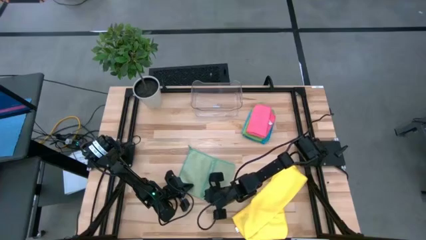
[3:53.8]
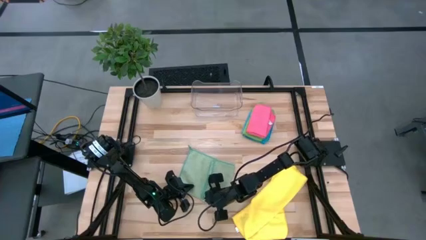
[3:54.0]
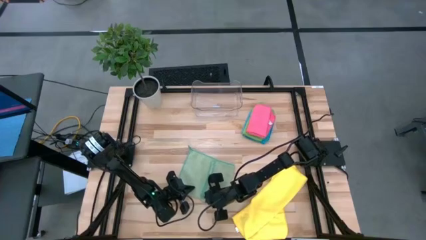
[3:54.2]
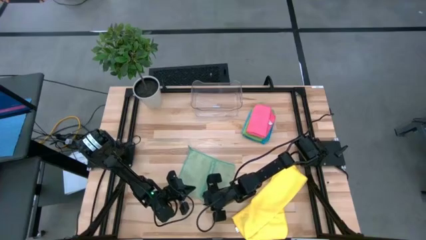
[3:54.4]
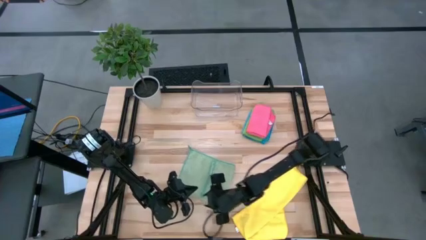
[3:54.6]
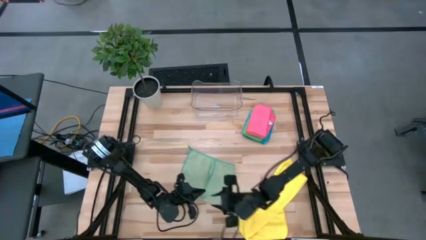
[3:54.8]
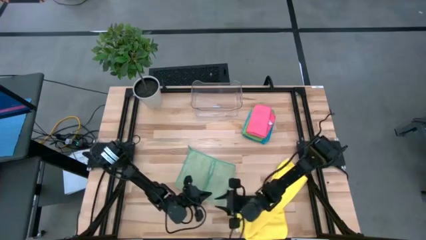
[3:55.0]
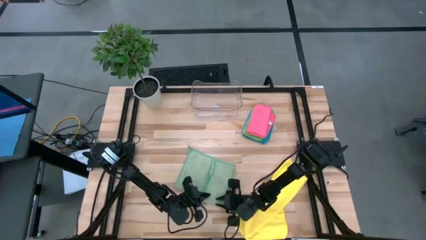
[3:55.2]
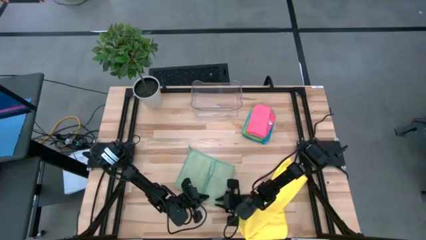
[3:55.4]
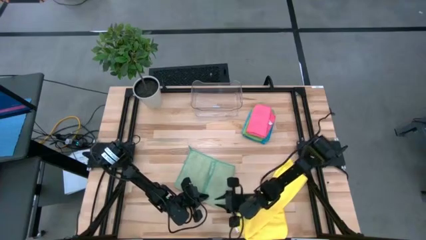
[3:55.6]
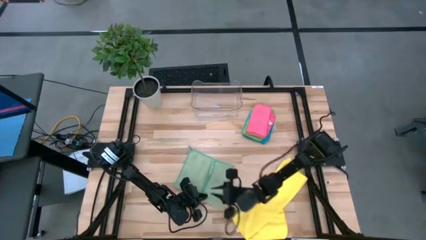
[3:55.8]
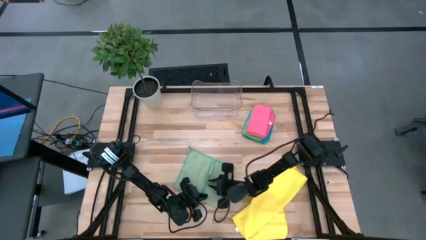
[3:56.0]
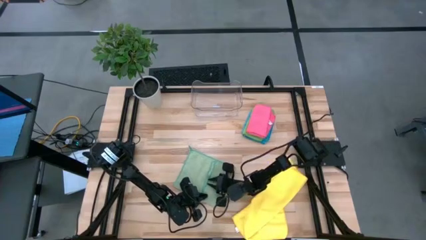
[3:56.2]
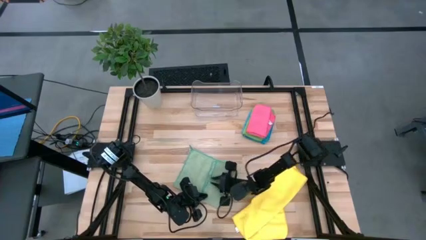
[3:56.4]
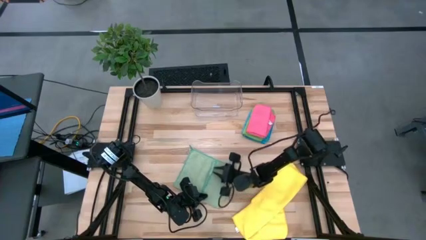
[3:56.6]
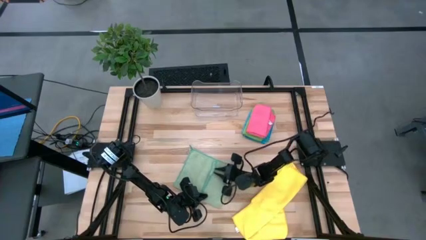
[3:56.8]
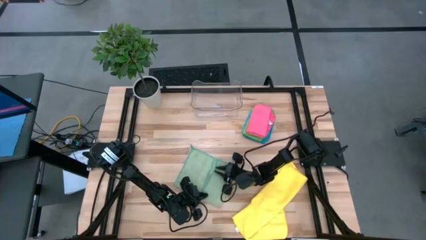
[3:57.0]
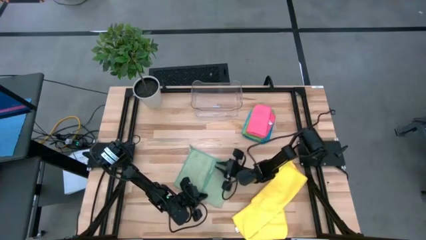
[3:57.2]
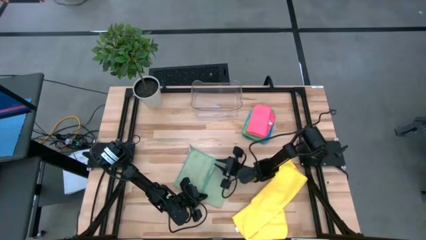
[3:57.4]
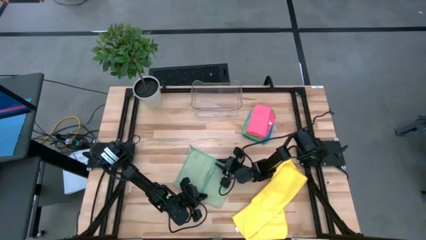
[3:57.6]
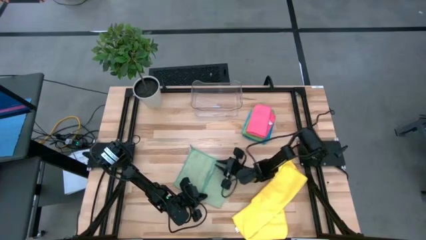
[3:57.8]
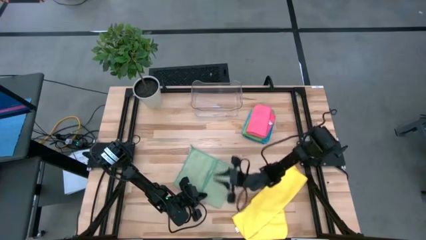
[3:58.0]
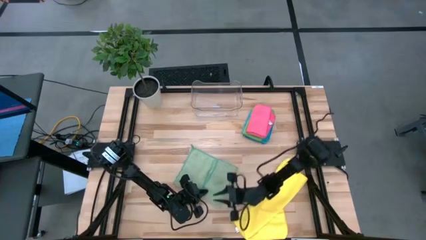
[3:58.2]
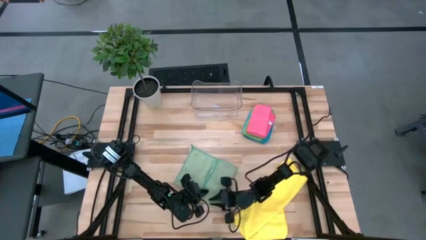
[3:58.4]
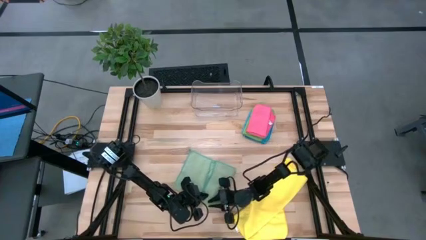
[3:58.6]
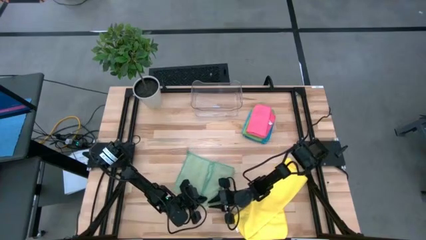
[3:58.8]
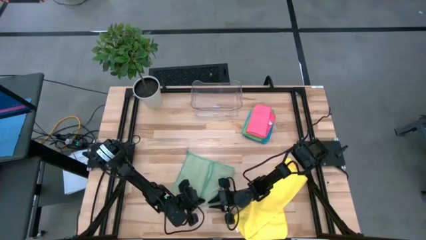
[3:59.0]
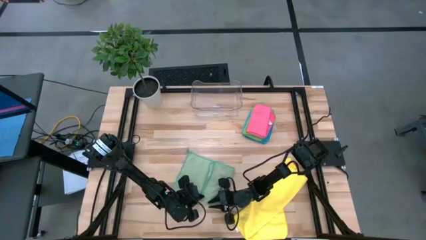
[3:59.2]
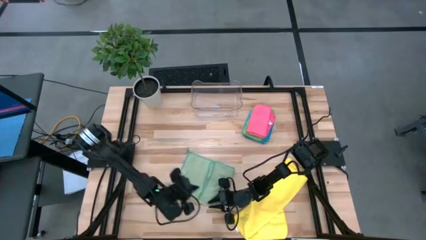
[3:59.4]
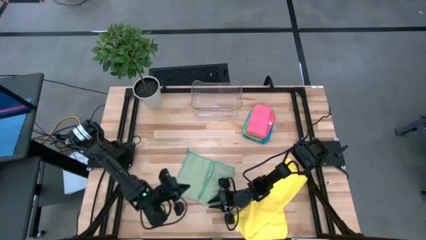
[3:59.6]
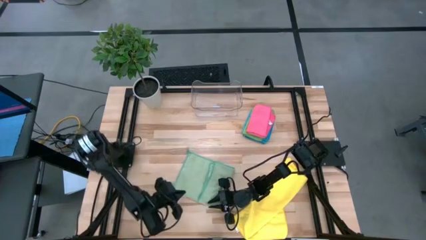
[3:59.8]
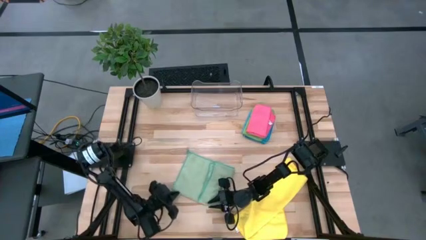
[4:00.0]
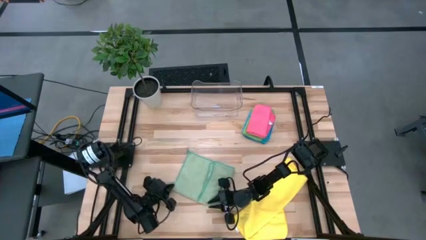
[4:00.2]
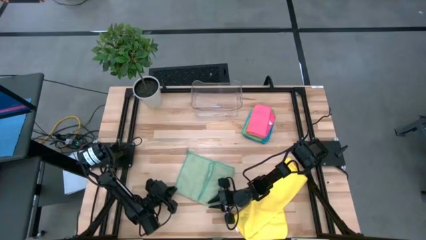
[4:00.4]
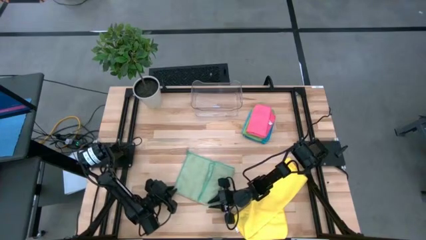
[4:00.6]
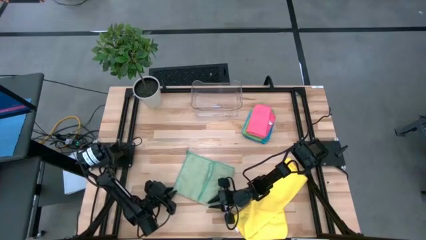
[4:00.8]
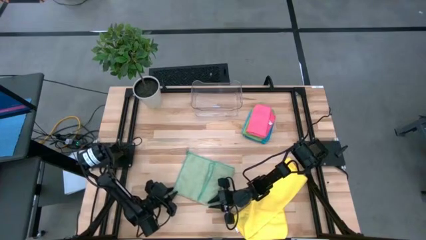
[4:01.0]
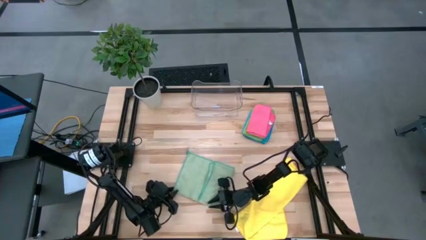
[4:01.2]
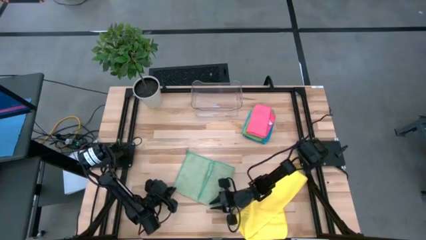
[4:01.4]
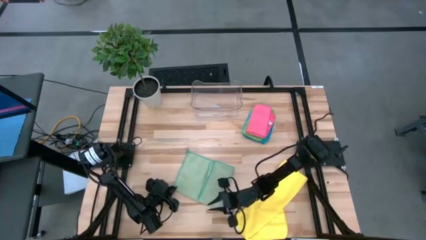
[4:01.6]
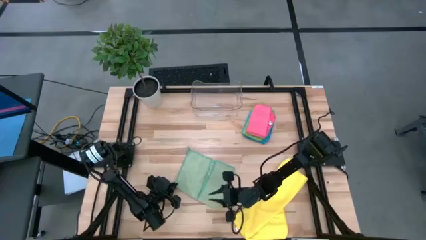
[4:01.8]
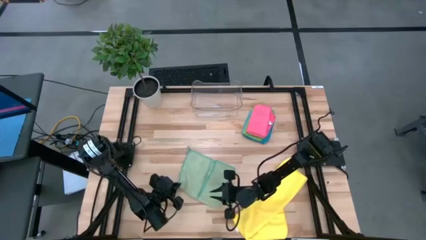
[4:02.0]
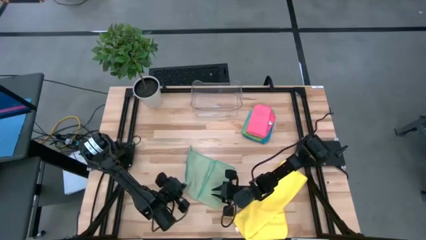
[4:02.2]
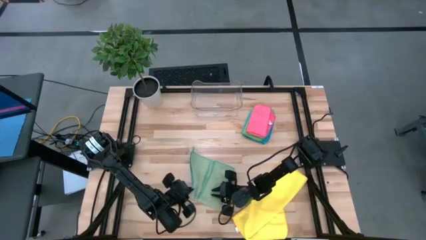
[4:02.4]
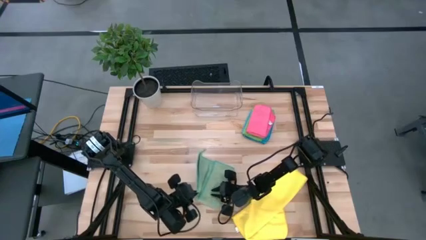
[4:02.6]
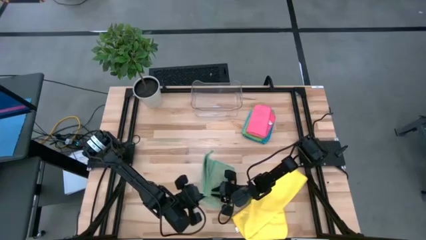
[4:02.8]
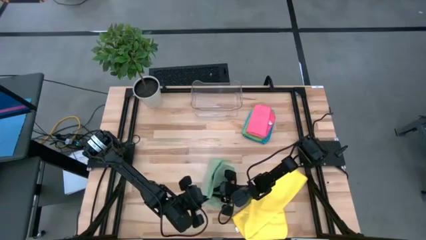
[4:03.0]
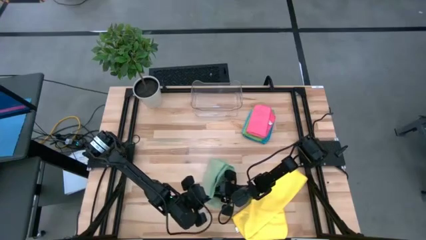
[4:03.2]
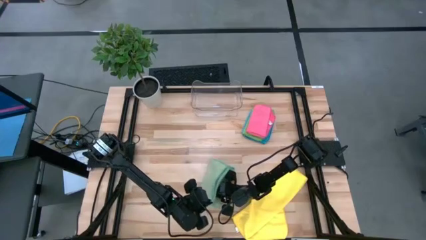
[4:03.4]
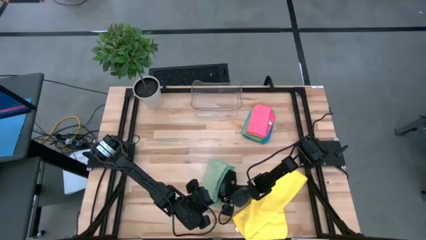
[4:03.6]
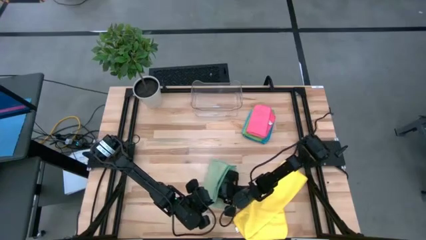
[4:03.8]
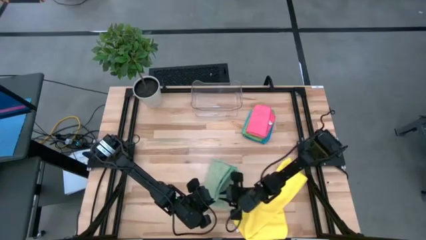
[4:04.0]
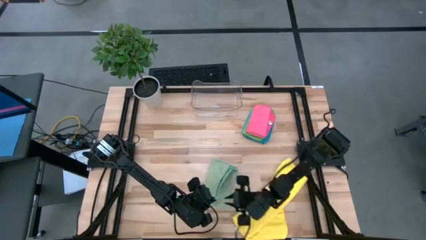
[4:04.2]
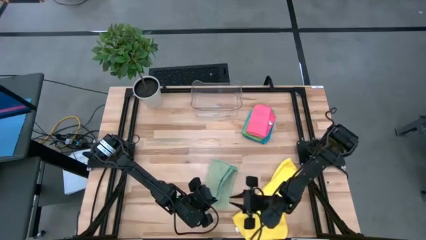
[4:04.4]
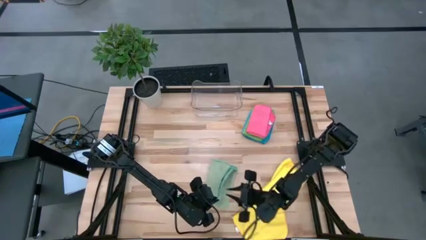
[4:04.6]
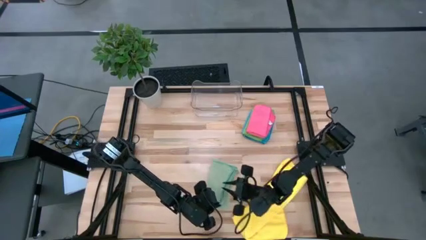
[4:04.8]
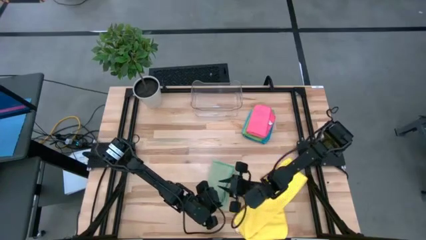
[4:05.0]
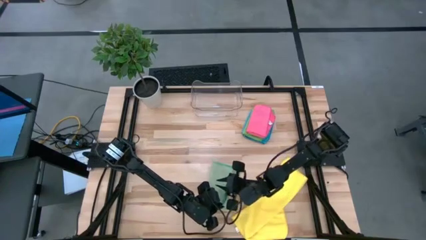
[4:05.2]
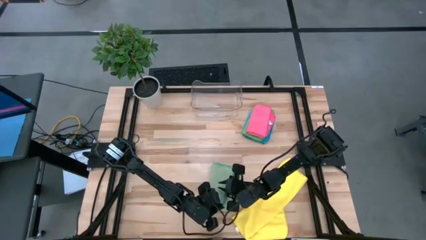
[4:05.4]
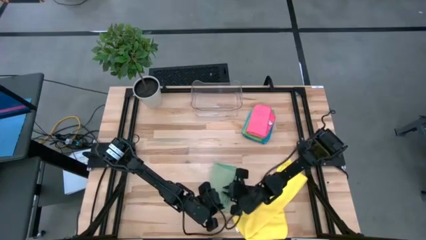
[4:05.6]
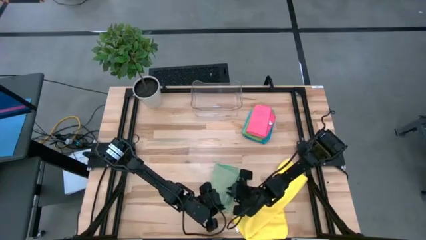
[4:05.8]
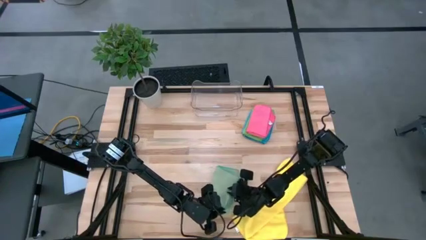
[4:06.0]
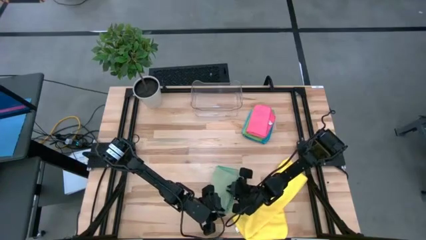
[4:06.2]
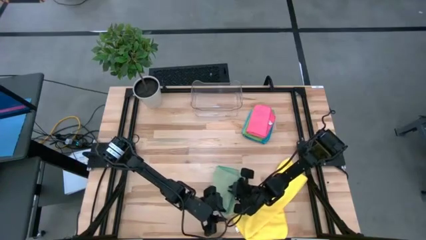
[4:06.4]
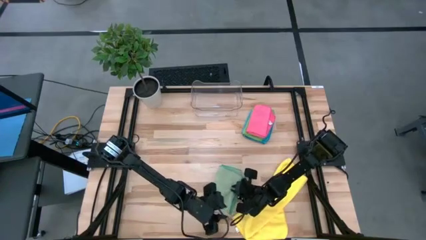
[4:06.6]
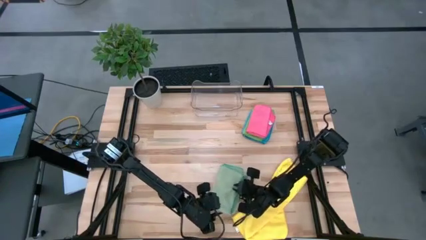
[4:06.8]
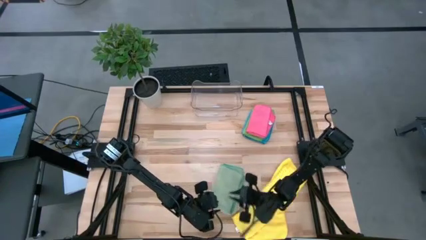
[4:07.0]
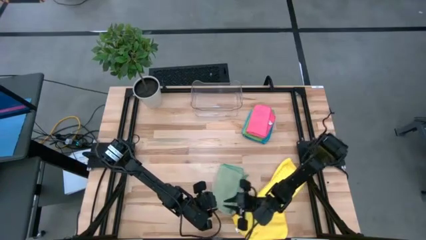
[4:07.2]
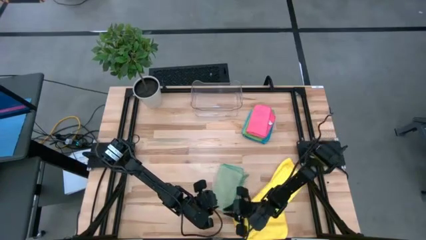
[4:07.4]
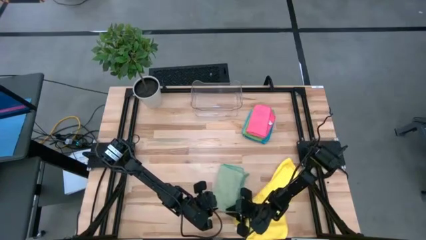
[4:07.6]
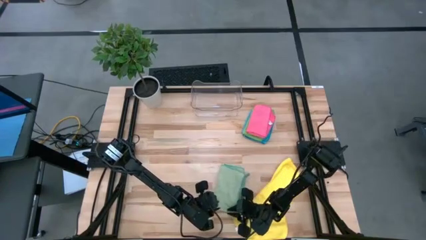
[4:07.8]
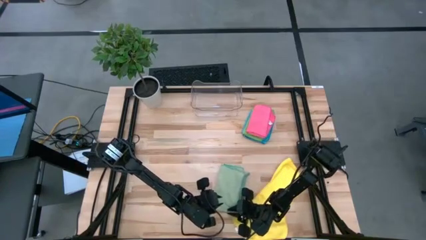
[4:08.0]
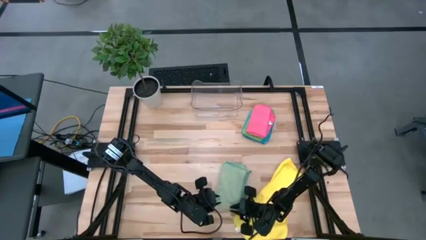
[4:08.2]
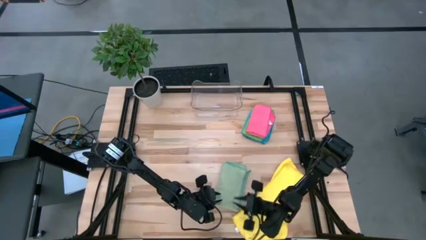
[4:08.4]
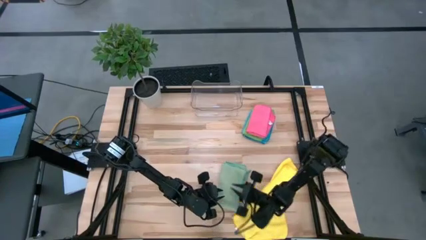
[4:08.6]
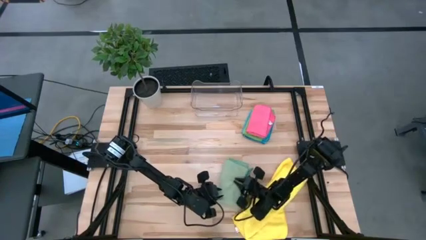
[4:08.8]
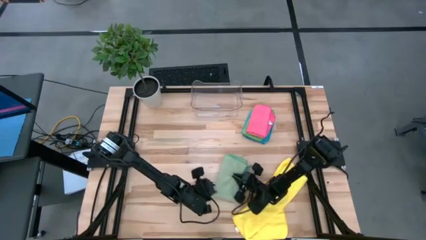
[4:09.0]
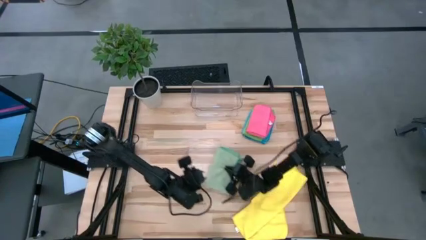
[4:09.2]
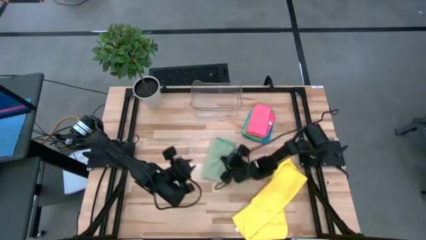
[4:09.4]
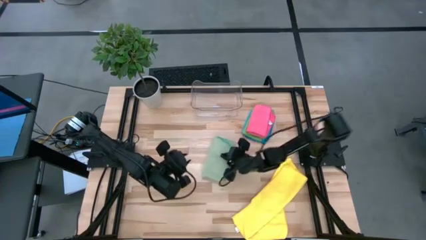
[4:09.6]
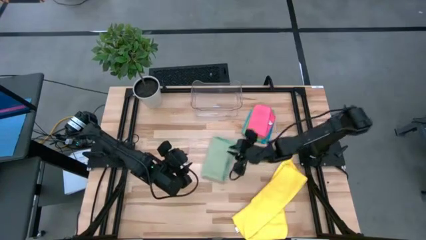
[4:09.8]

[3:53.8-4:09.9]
Task: Fold microfiber towels
Fold the light green microfiber towel
